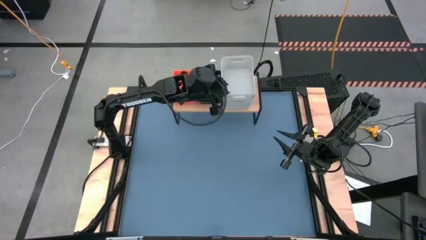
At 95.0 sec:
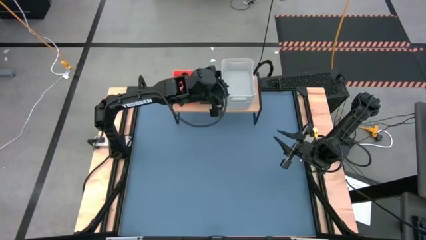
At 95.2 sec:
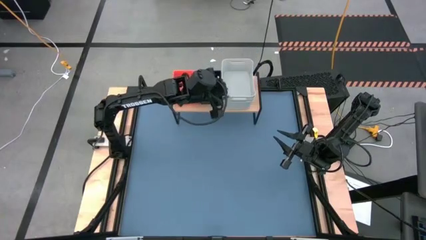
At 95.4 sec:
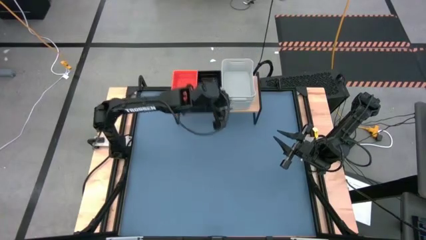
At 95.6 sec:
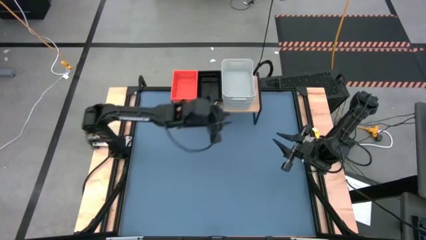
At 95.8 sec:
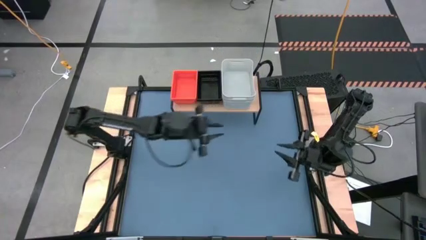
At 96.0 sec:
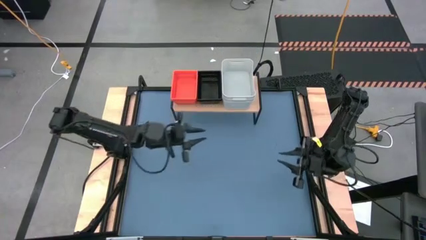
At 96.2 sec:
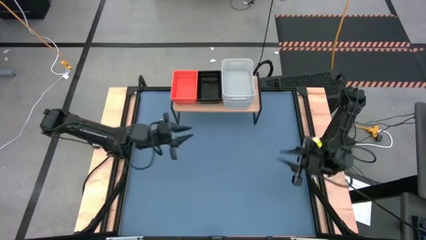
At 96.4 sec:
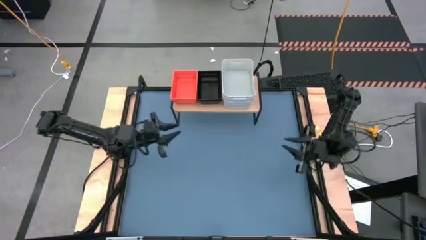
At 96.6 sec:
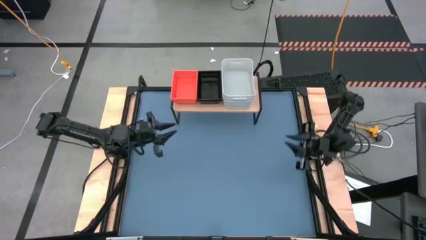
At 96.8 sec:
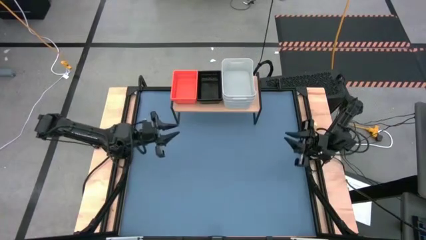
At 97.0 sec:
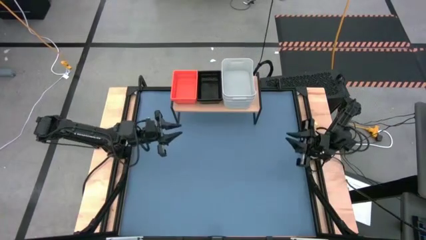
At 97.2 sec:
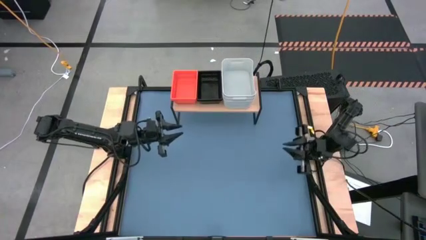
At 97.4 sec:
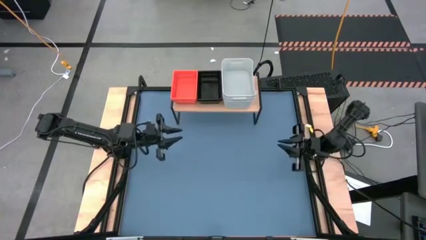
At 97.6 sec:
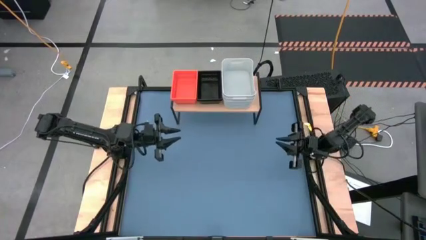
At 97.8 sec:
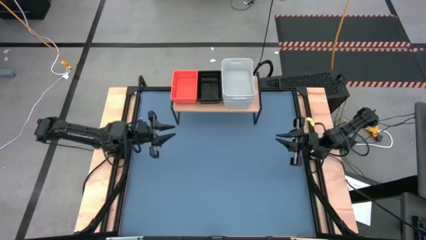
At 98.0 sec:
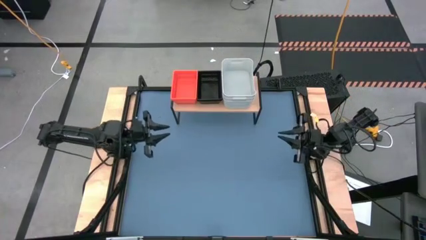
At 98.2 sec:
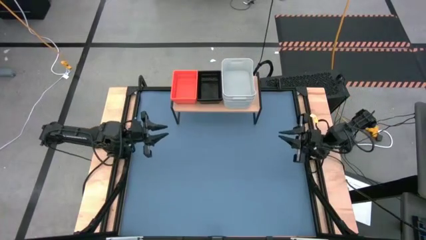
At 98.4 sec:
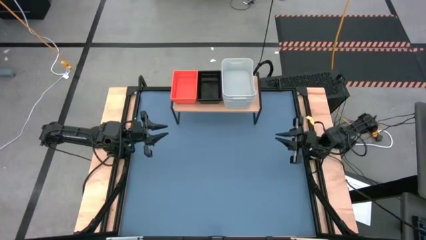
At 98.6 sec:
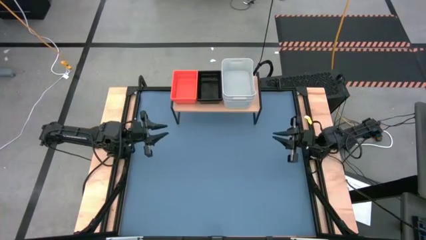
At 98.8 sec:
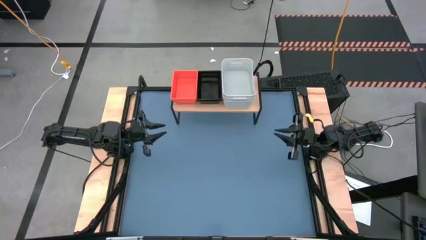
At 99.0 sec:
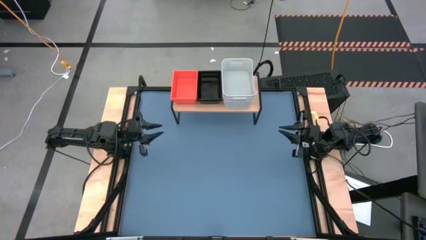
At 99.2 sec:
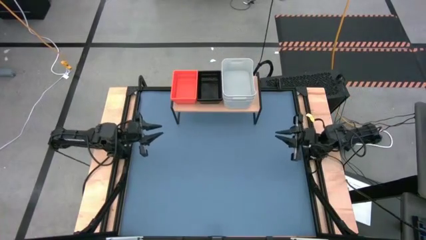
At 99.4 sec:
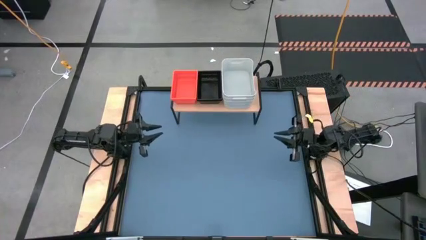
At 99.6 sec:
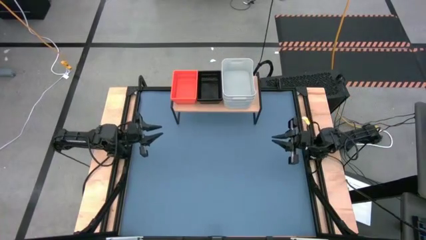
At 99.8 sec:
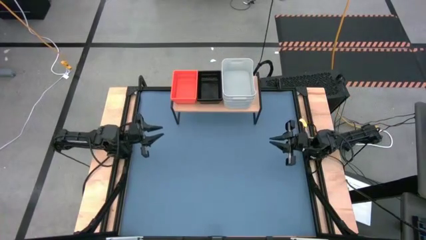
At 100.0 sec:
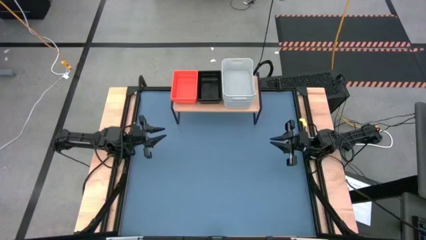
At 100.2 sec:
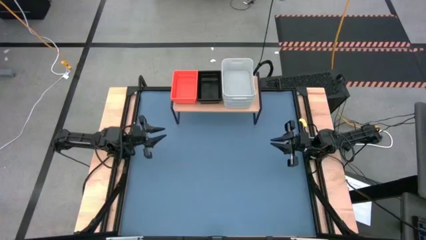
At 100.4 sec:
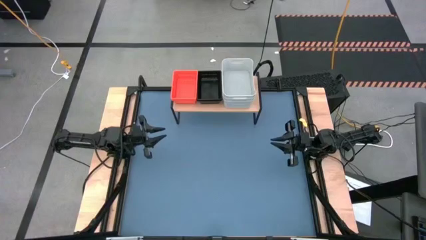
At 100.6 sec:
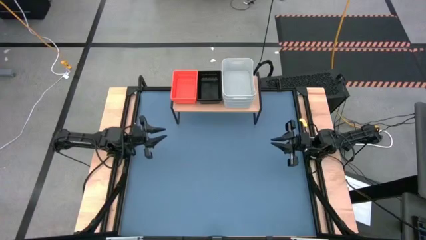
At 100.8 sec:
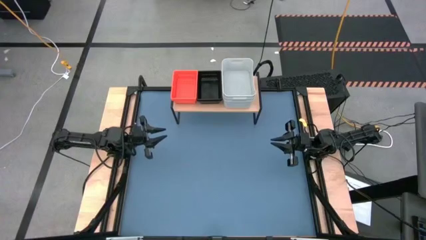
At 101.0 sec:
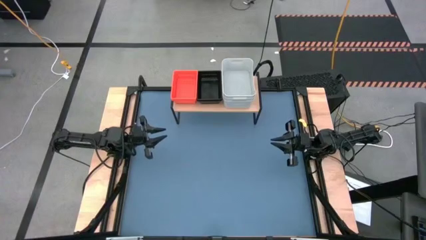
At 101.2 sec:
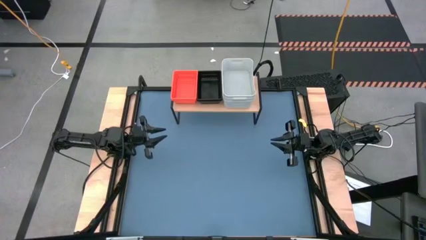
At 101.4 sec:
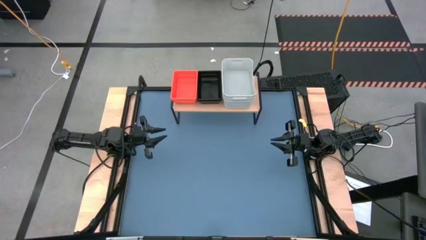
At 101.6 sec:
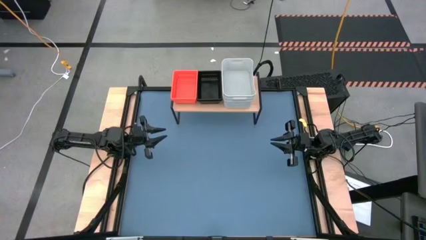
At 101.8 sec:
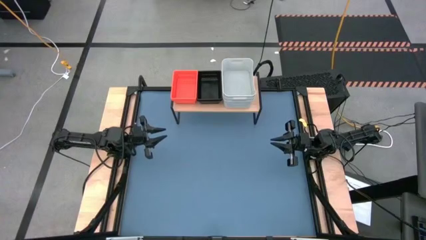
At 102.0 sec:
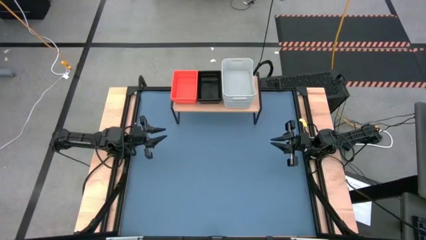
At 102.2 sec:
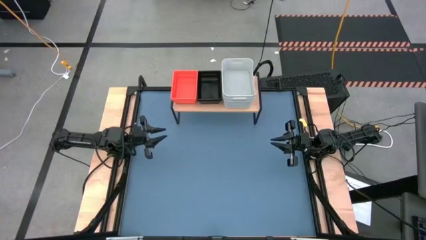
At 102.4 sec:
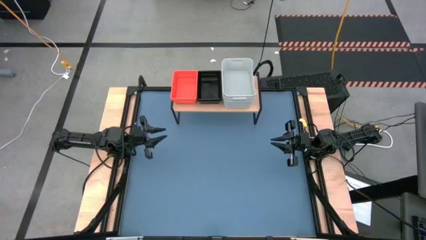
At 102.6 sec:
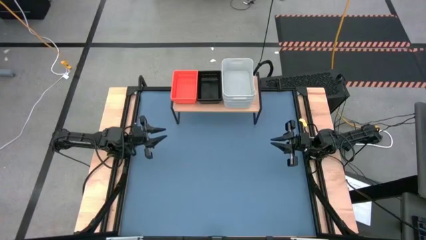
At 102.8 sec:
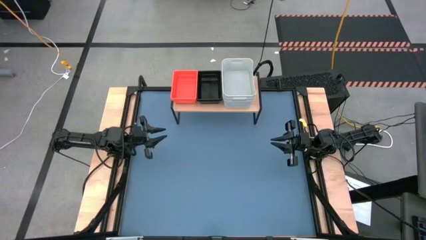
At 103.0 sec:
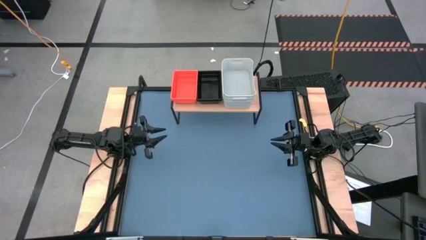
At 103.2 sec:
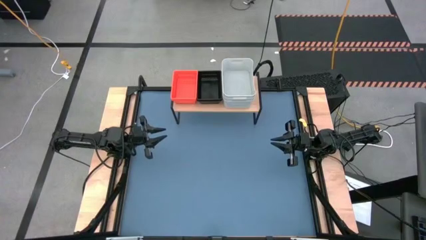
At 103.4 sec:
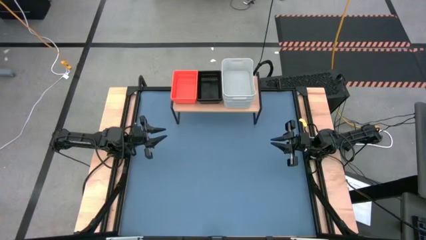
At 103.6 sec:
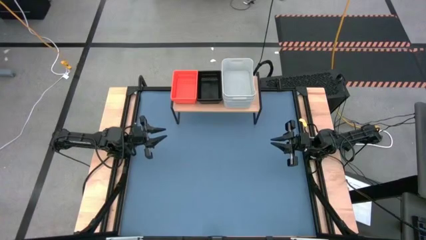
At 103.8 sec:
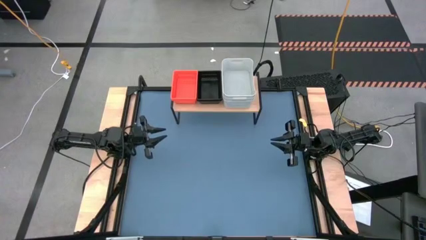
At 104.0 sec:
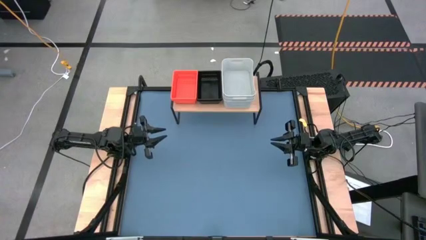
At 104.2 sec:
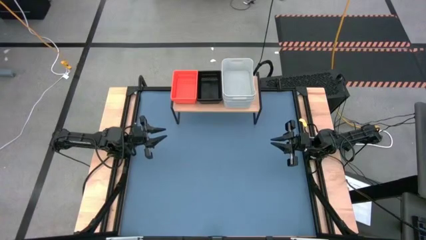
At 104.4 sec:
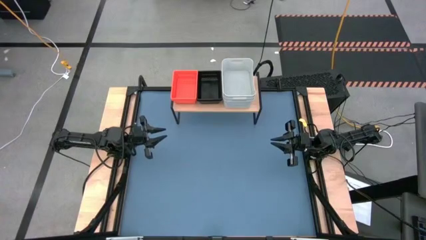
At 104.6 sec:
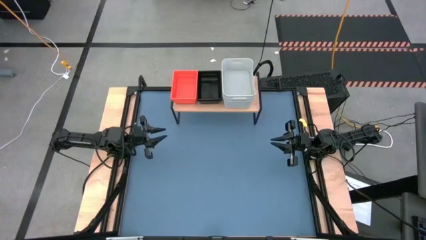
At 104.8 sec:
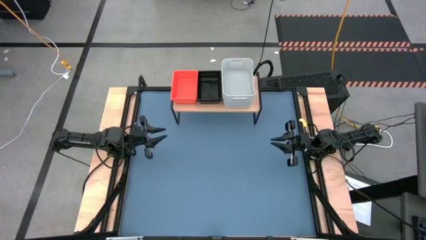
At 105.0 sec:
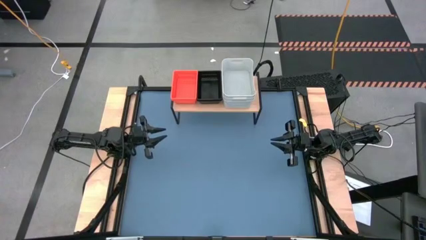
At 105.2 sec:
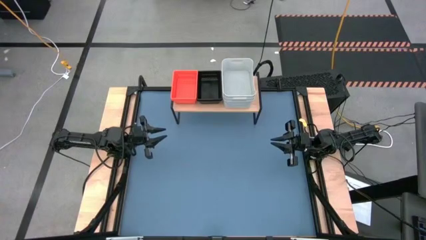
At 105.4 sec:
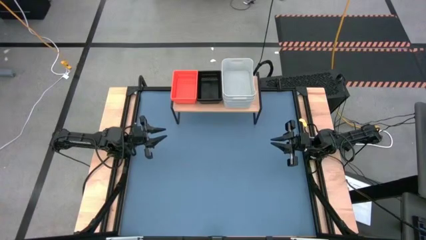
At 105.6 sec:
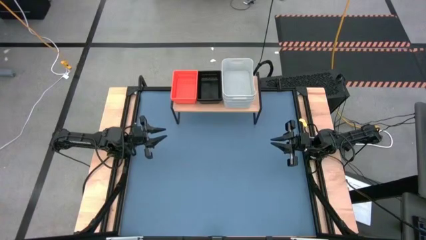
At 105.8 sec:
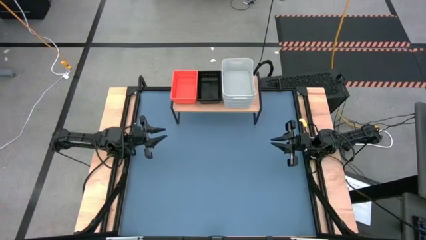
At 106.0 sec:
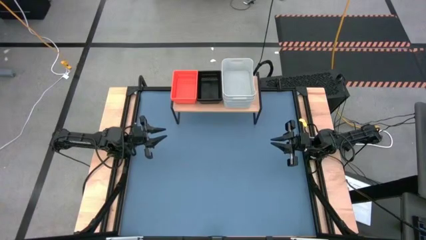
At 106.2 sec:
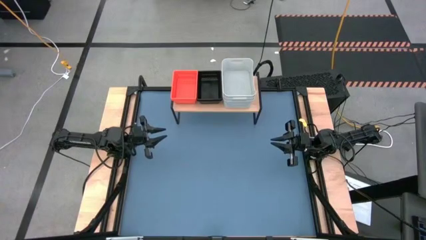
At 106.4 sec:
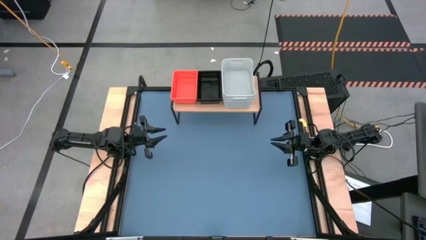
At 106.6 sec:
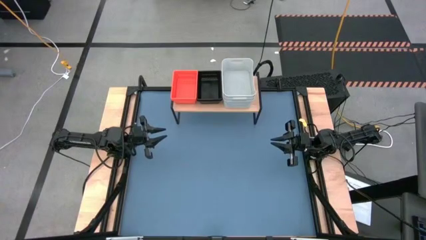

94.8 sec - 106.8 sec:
Task: Stack baskets on shelf by color
Return to Home Position
